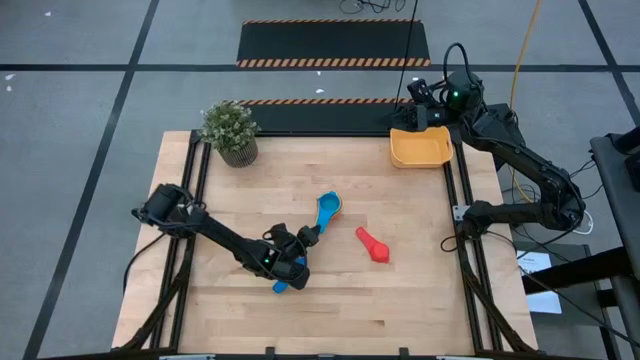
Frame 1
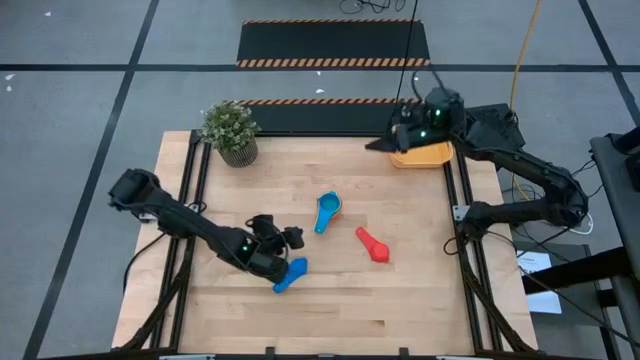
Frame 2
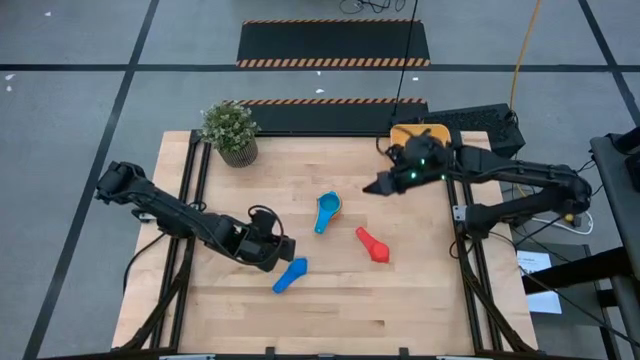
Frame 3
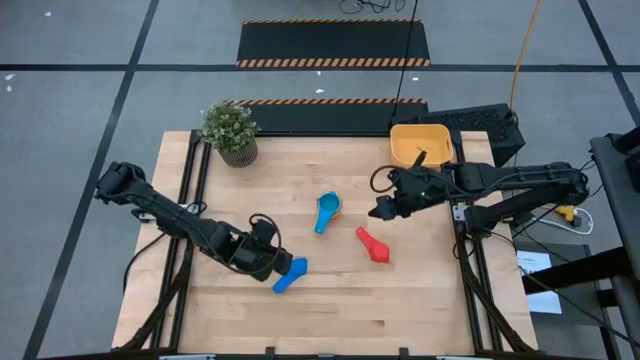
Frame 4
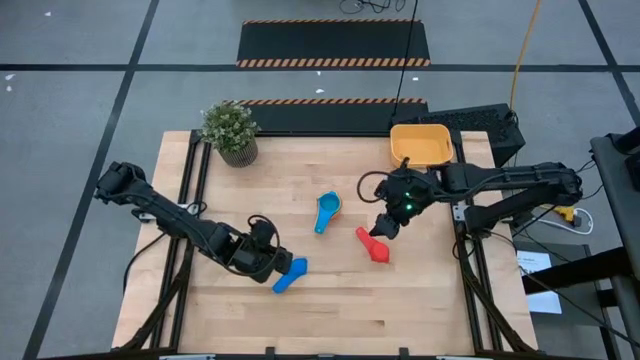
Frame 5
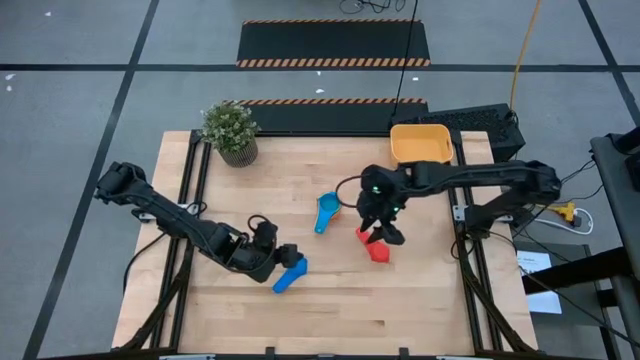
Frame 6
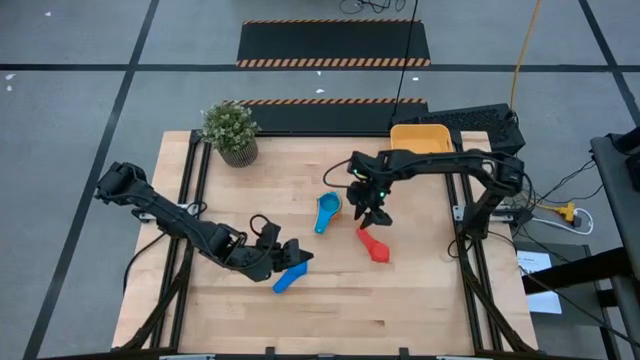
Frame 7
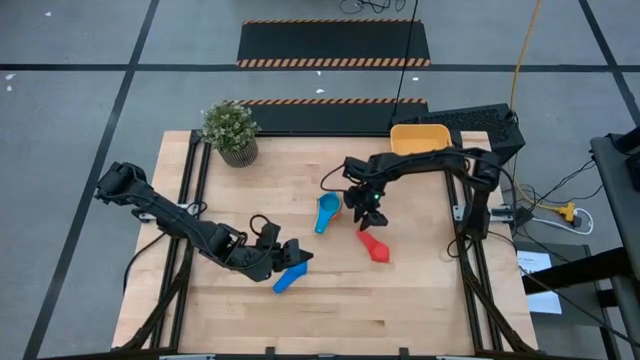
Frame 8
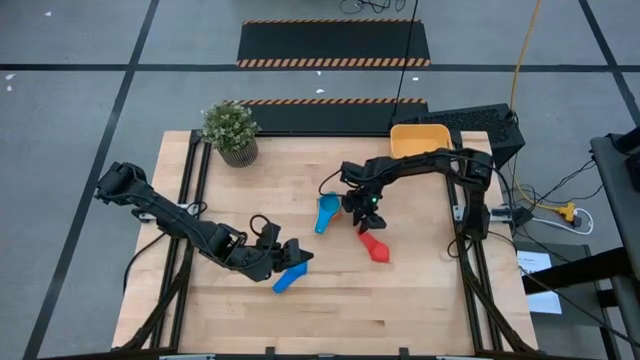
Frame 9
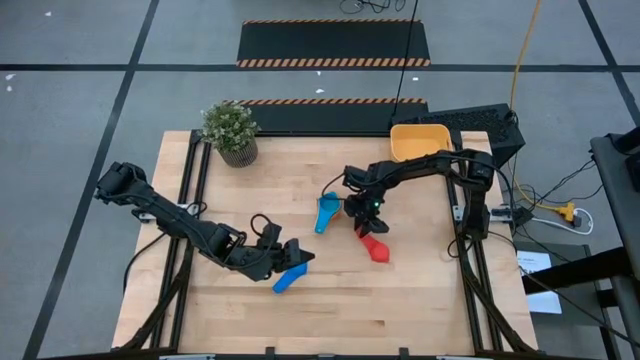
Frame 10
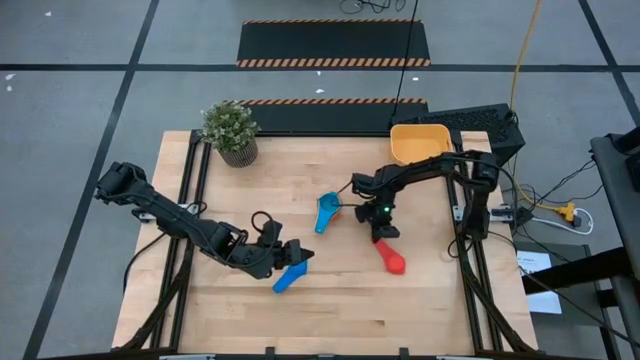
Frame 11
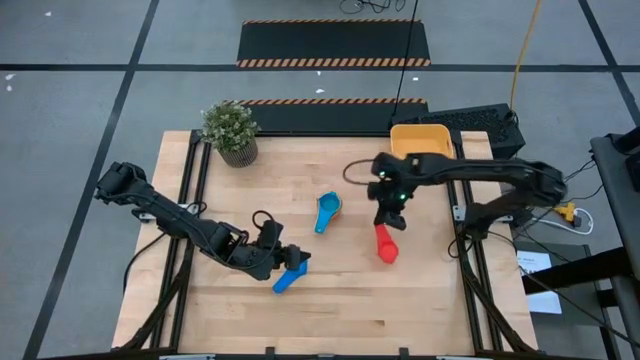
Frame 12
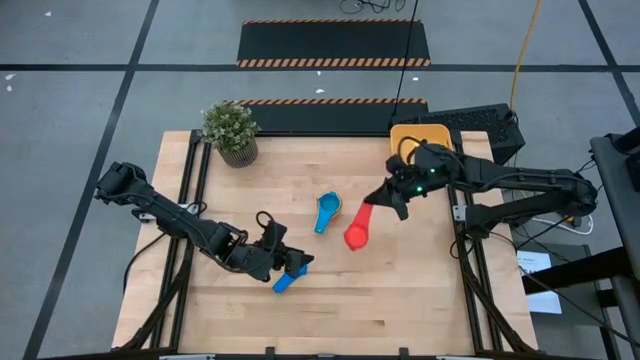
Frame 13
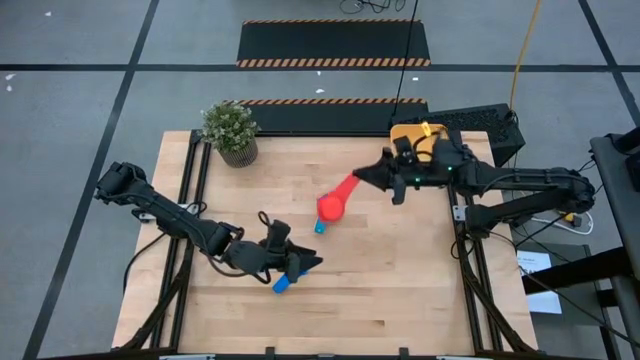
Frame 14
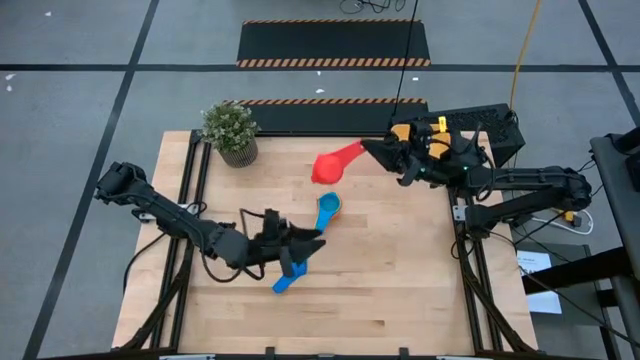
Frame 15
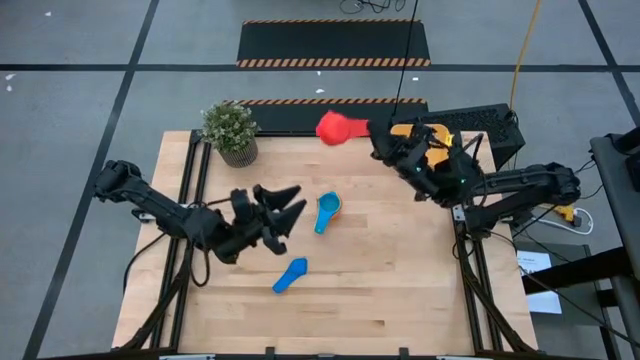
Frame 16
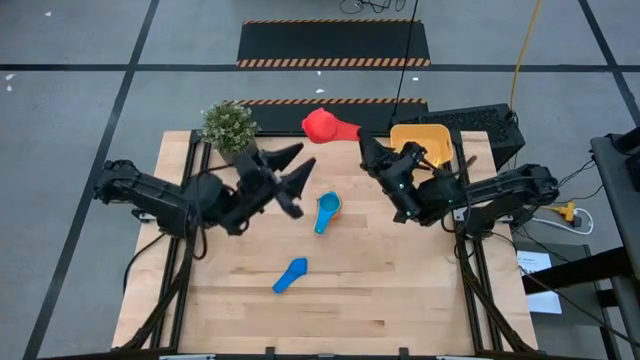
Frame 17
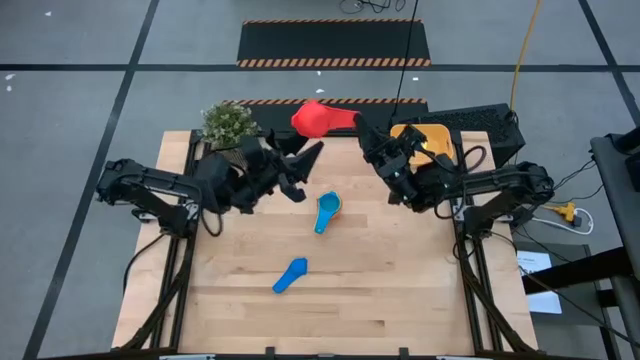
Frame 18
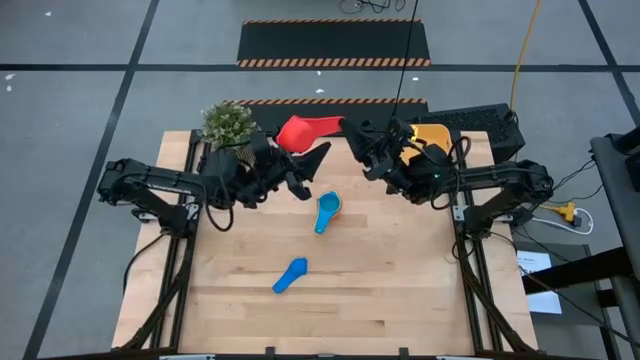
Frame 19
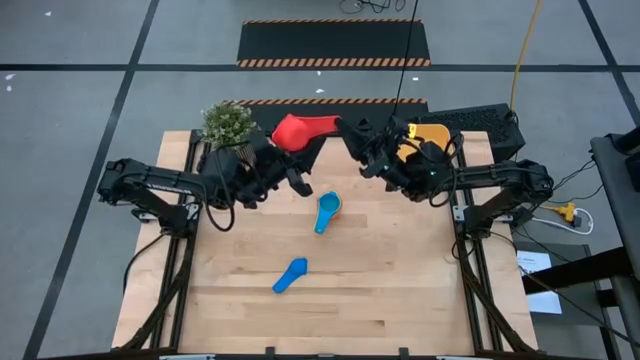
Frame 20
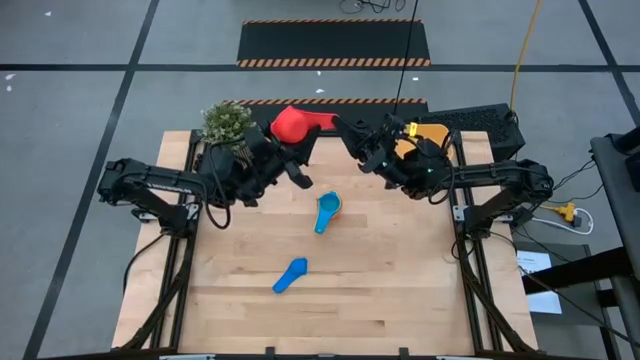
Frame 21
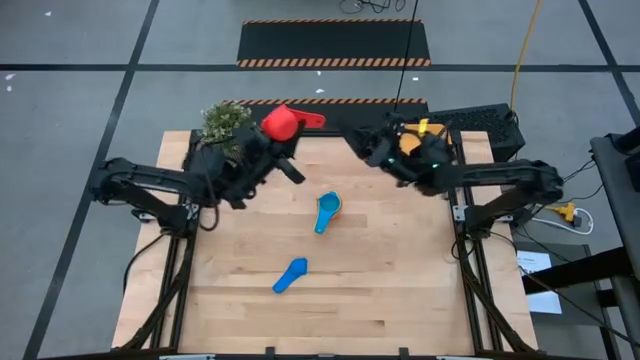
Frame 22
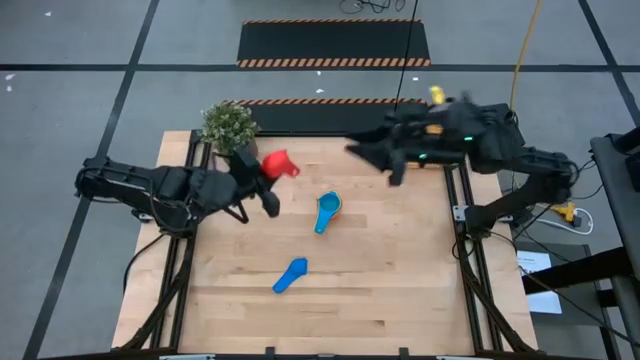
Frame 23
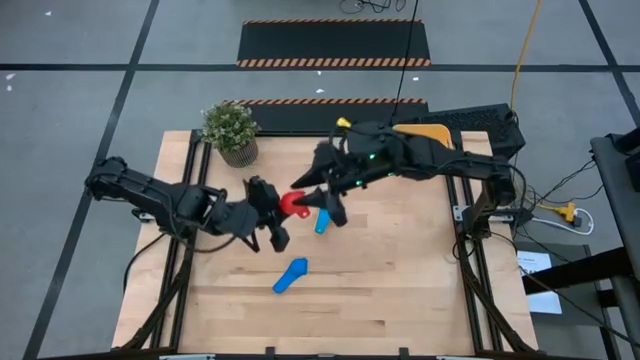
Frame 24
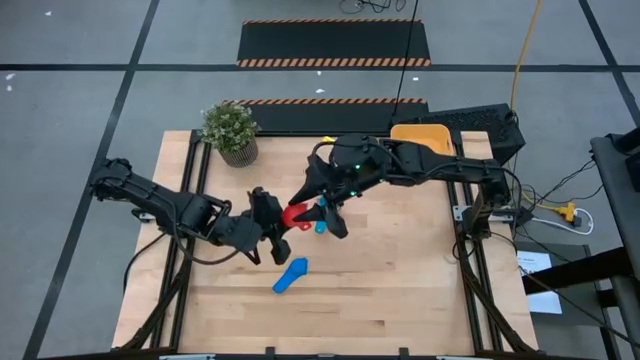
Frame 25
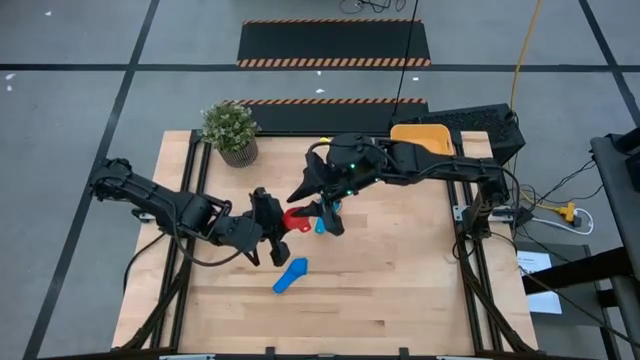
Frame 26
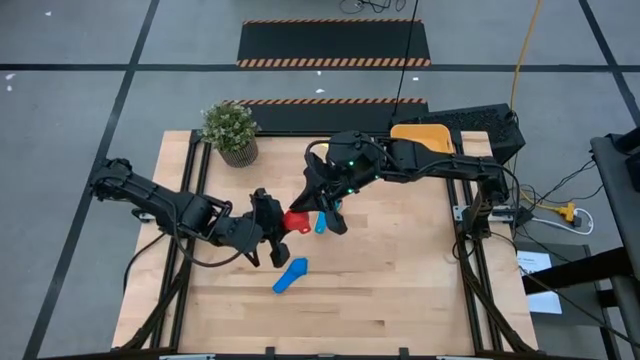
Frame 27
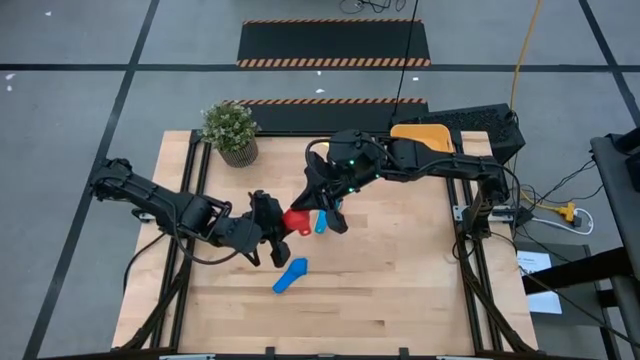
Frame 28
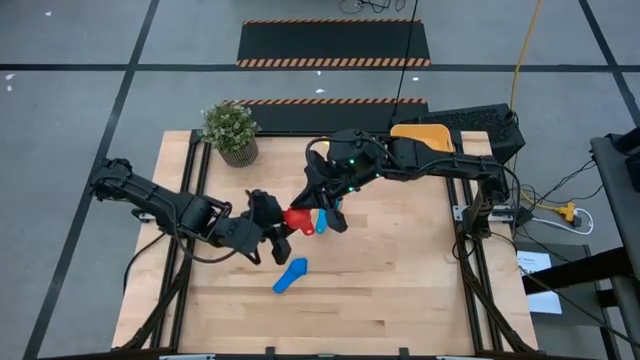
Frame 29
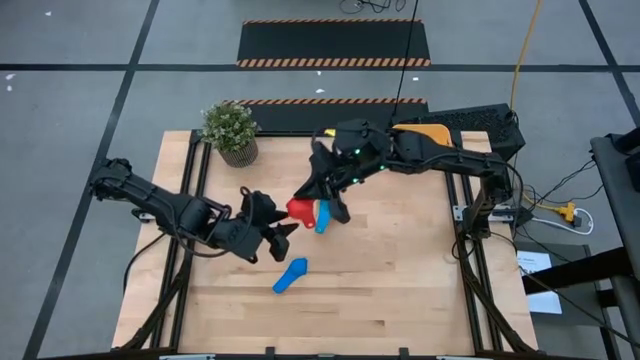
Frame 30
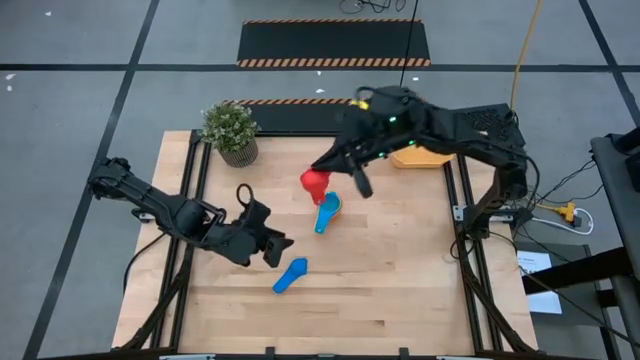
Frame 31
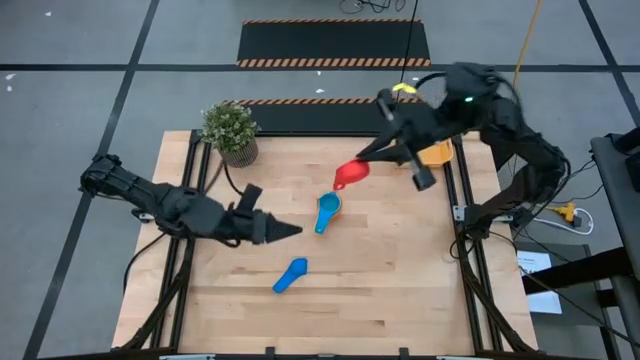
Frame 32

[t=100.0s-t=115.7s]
Task: Nest measuring cups in basket
Stack the red measuring cup on top of the light blue measuring cup

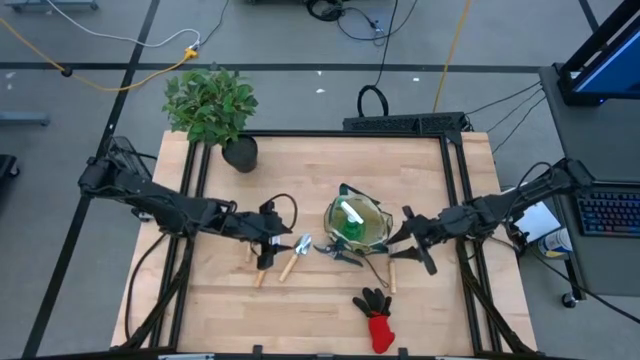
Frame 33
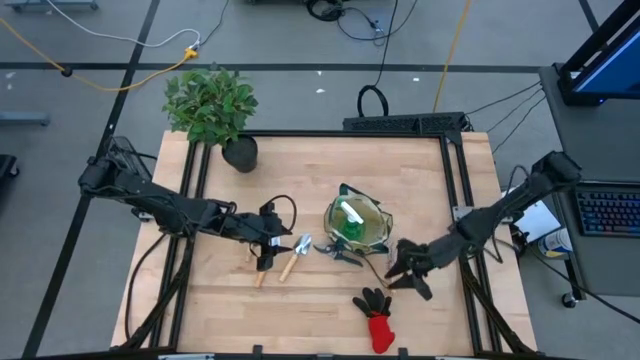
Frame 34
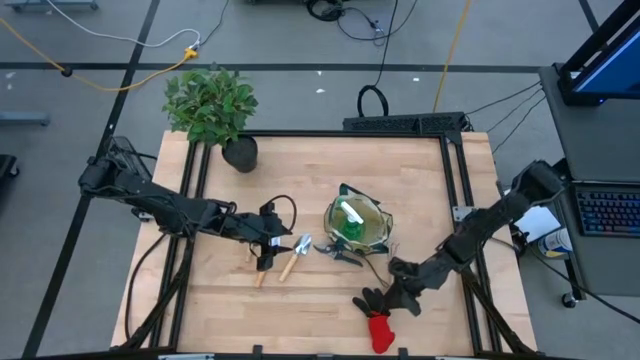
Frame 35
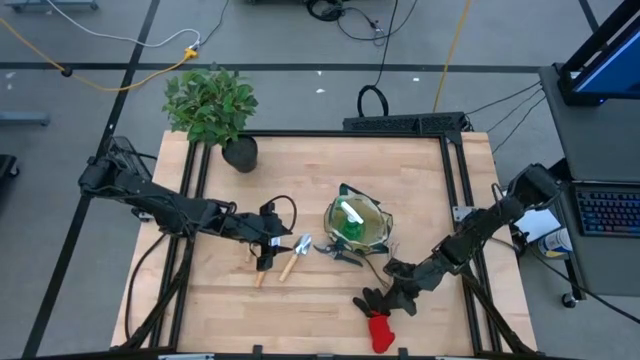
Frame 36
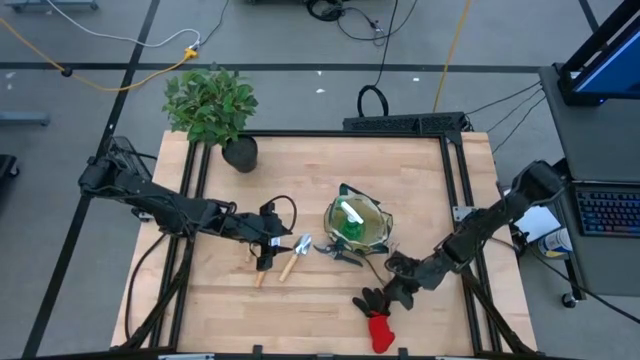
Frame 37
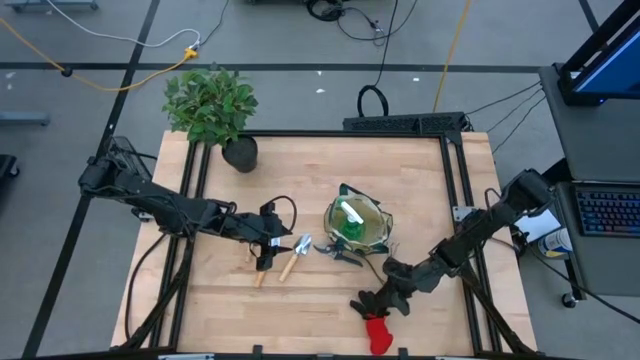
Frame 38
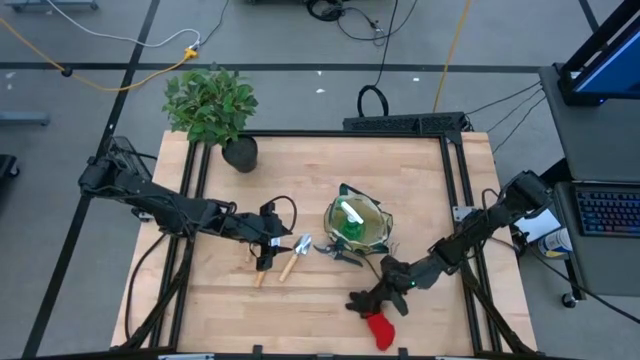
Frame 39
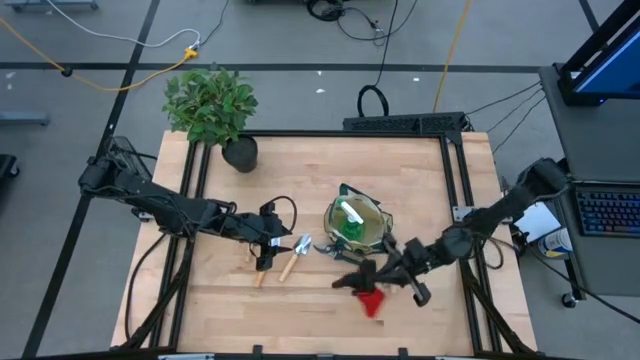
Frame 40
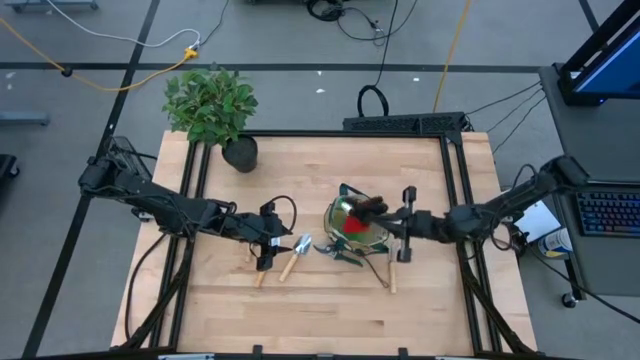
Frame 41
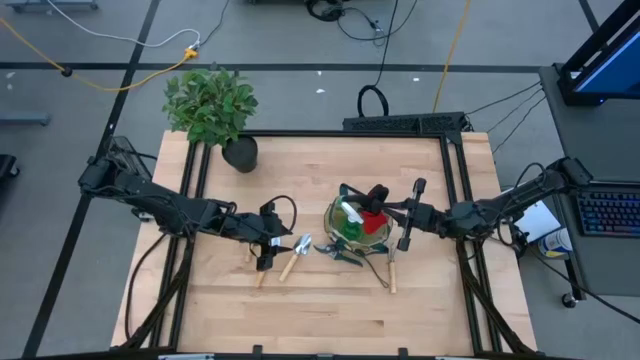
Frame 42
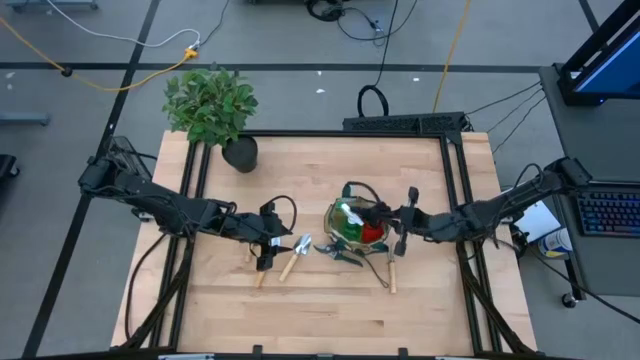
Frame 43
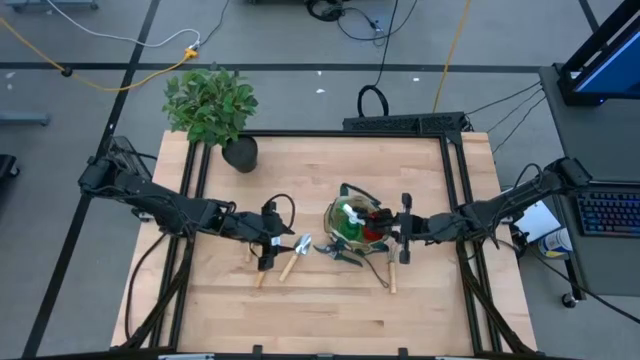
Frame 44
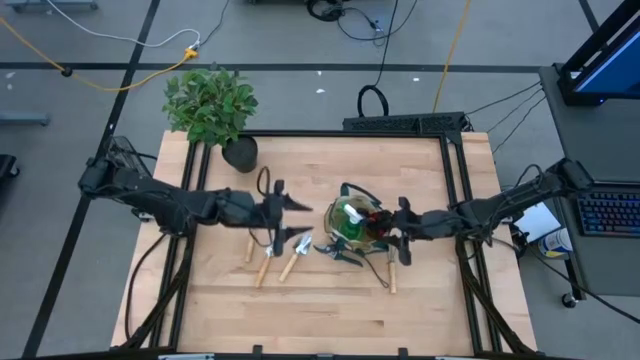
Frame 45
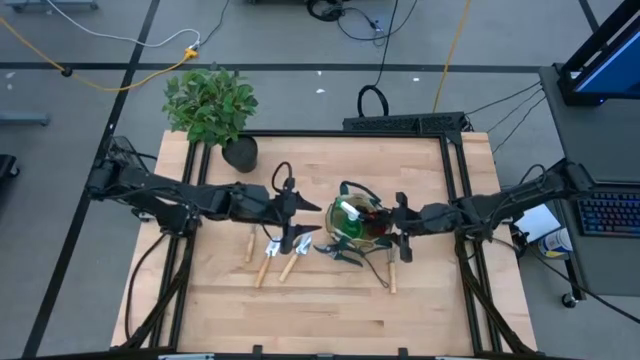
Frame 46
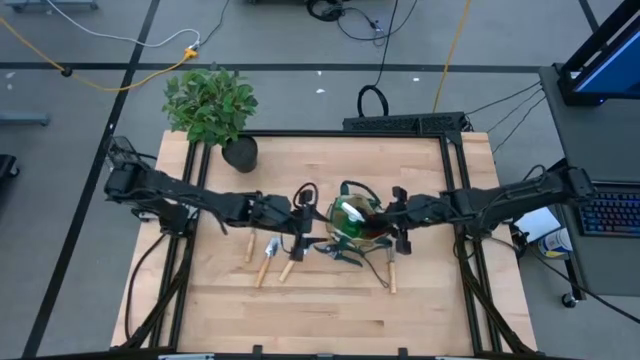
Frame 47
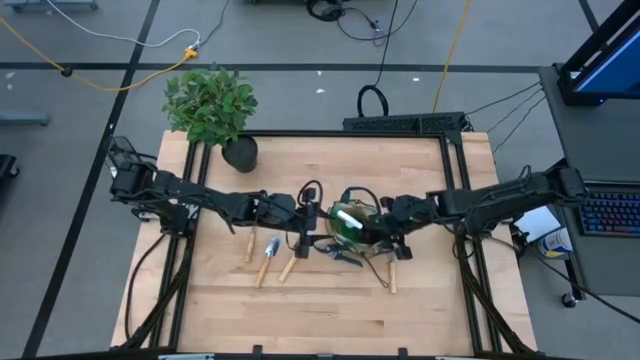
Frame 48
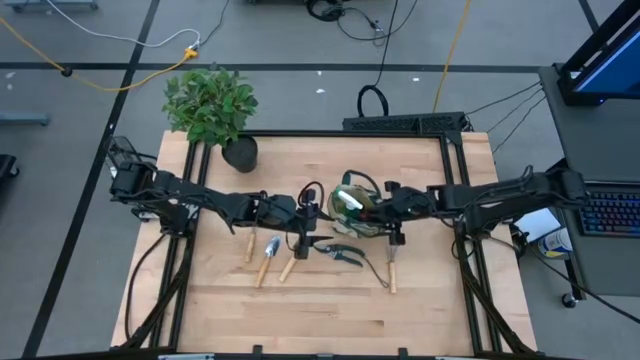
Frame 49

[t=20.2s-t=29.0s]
Task: Pick & Place Garden tools in Gardening bag
Put the gloves into the gardening bag
